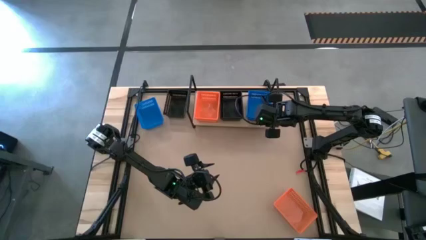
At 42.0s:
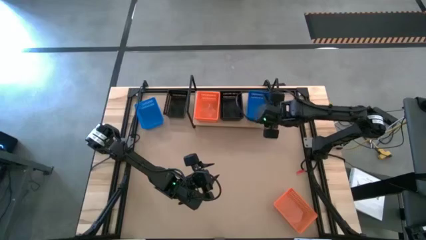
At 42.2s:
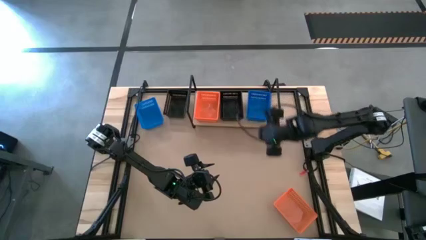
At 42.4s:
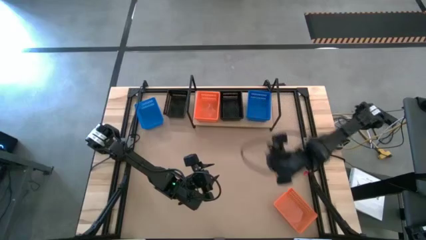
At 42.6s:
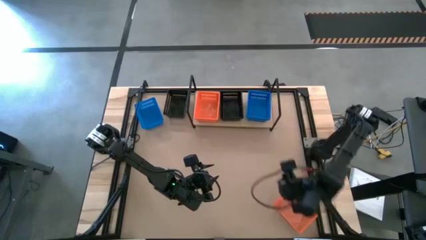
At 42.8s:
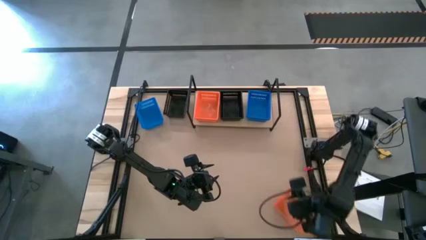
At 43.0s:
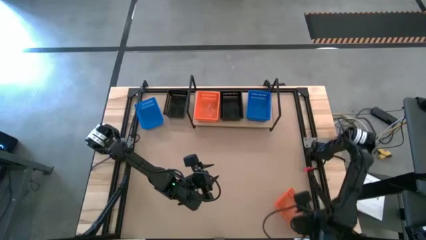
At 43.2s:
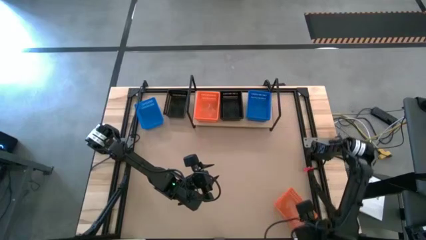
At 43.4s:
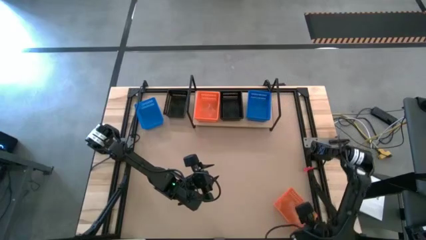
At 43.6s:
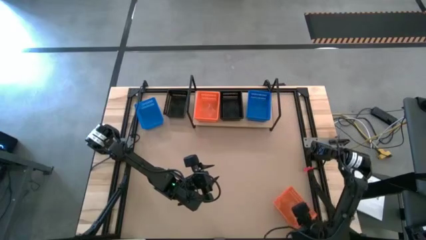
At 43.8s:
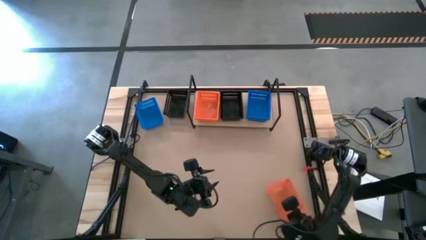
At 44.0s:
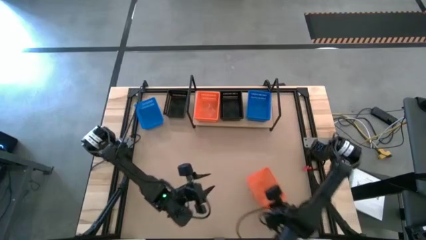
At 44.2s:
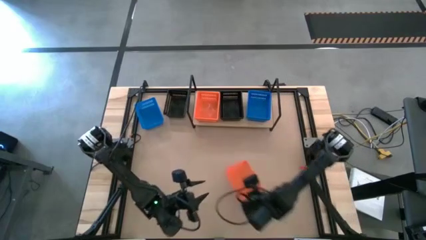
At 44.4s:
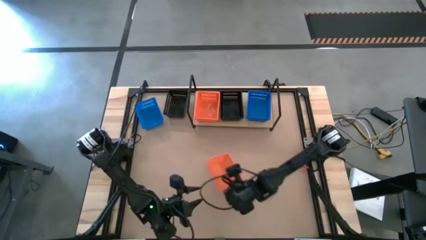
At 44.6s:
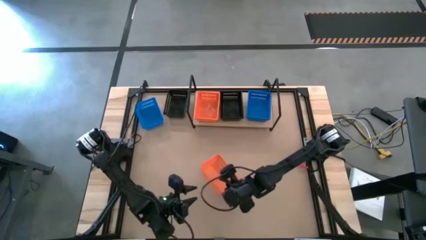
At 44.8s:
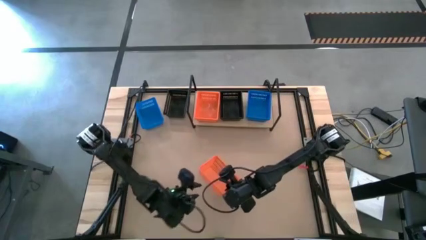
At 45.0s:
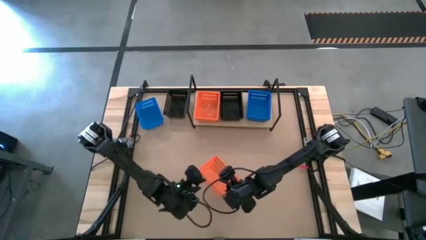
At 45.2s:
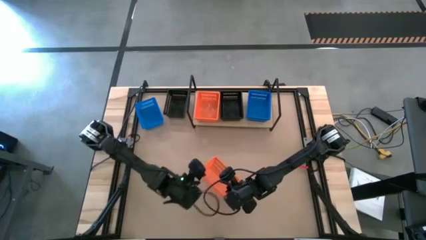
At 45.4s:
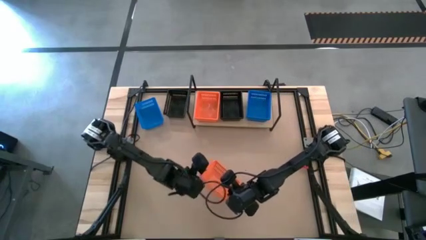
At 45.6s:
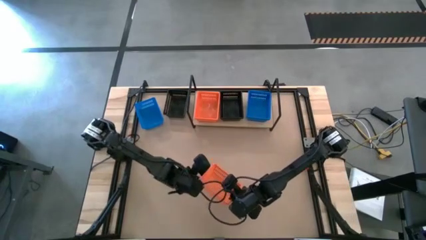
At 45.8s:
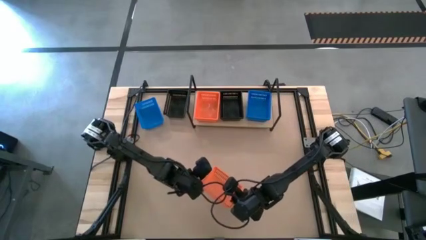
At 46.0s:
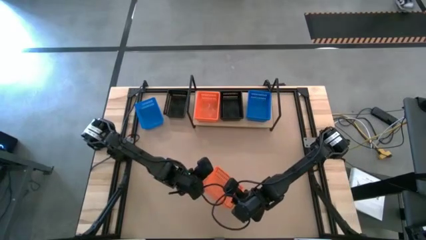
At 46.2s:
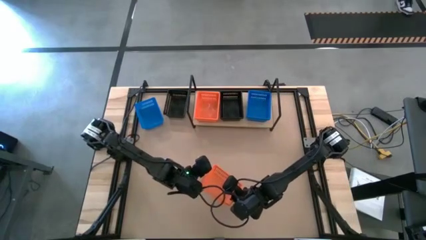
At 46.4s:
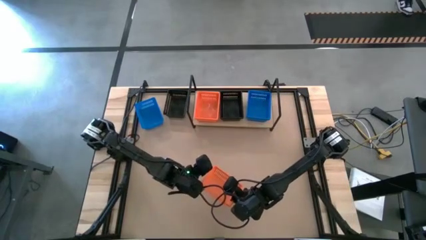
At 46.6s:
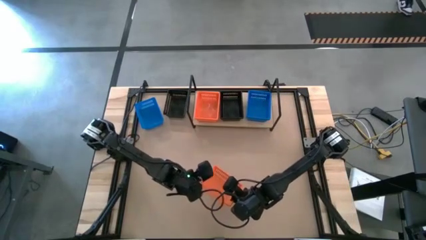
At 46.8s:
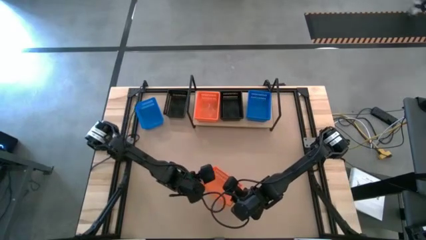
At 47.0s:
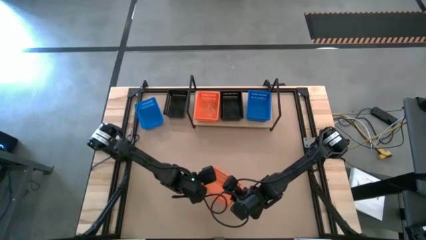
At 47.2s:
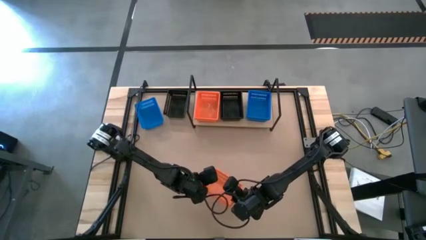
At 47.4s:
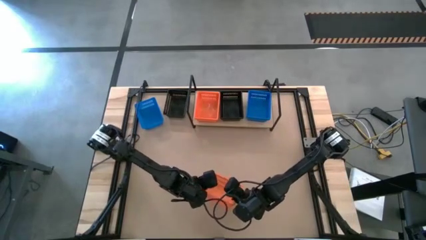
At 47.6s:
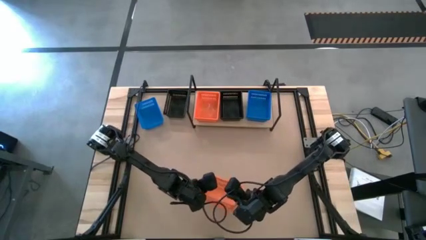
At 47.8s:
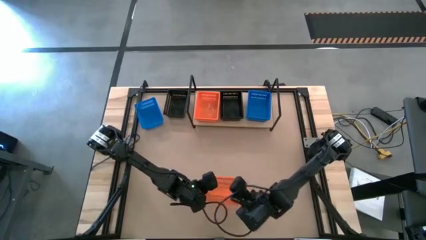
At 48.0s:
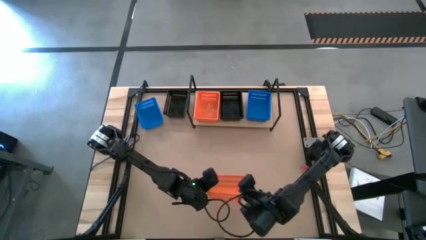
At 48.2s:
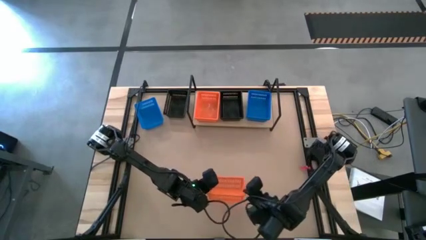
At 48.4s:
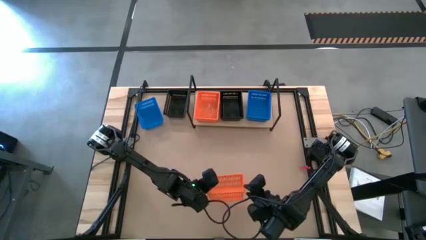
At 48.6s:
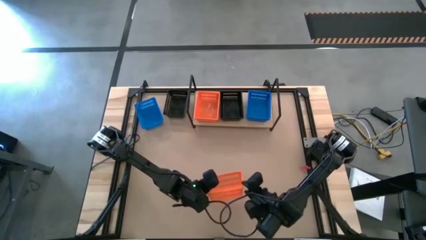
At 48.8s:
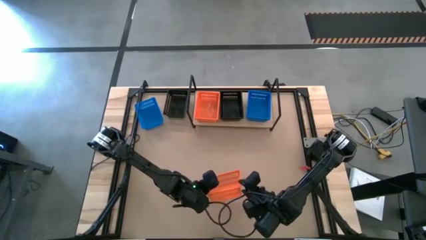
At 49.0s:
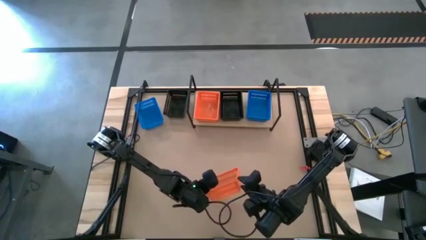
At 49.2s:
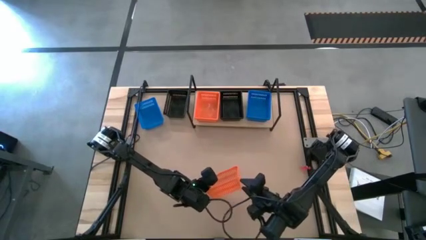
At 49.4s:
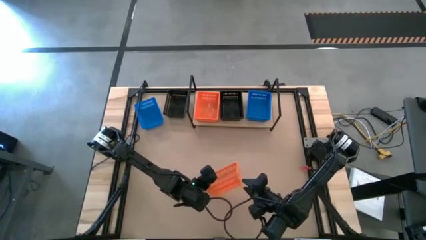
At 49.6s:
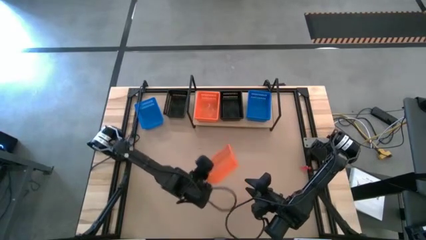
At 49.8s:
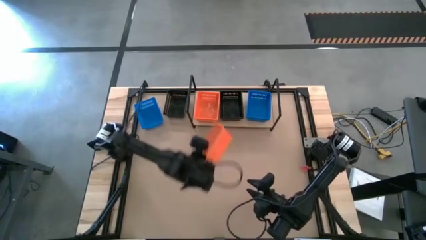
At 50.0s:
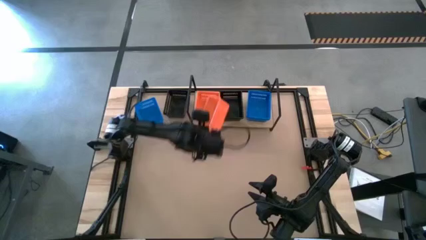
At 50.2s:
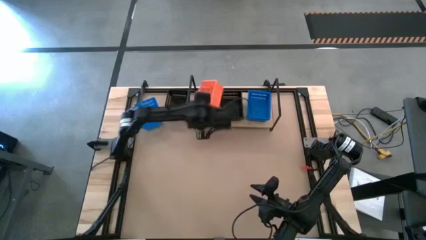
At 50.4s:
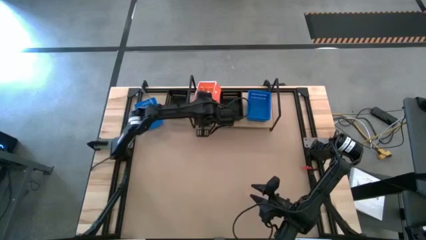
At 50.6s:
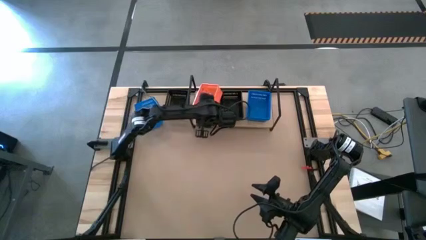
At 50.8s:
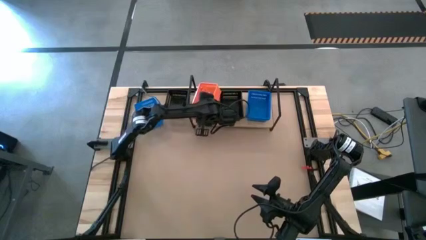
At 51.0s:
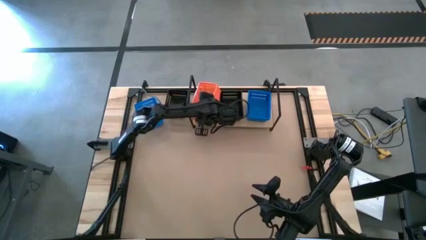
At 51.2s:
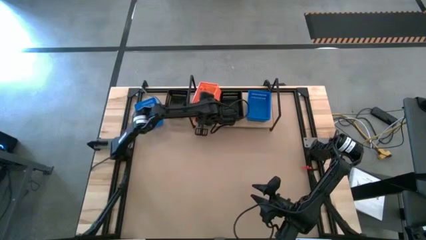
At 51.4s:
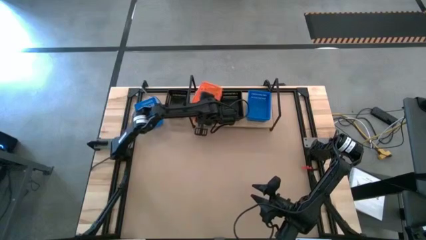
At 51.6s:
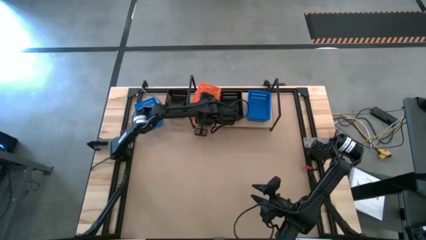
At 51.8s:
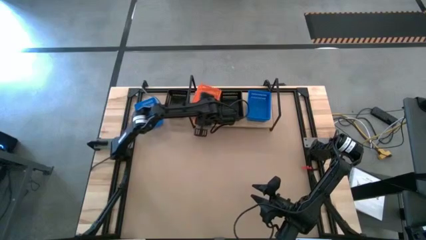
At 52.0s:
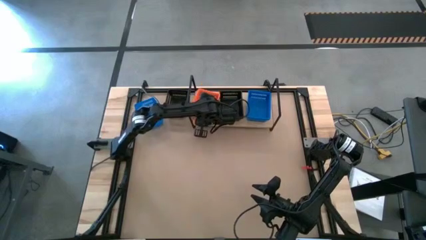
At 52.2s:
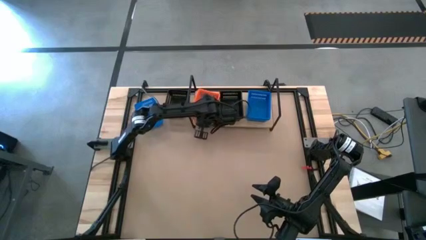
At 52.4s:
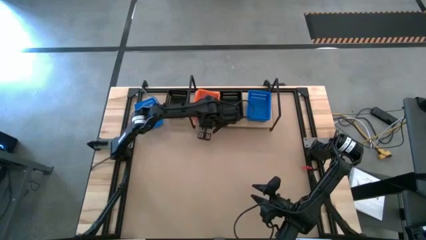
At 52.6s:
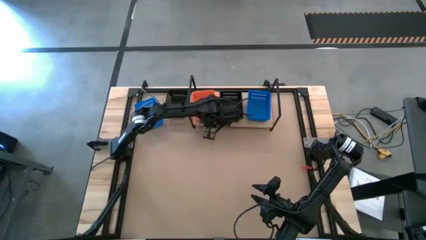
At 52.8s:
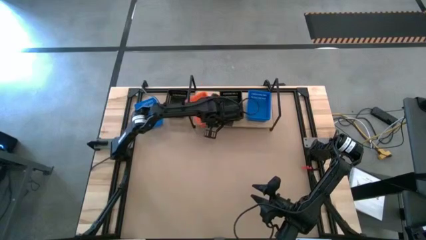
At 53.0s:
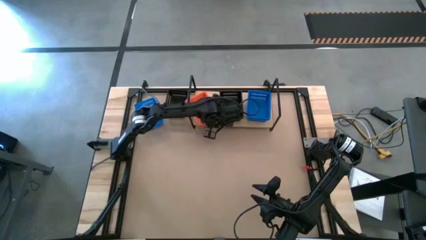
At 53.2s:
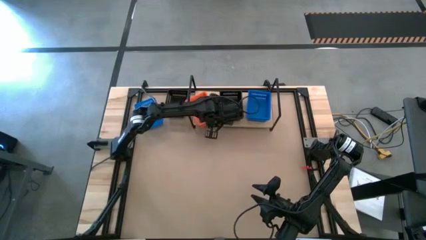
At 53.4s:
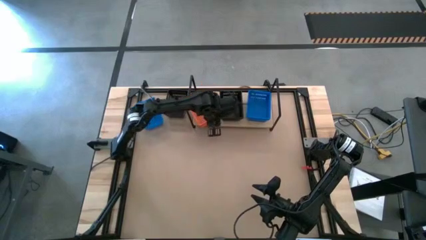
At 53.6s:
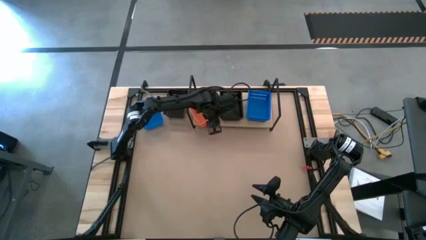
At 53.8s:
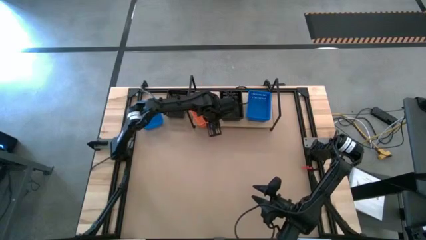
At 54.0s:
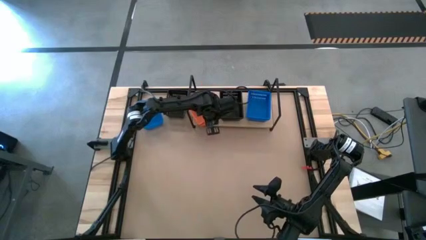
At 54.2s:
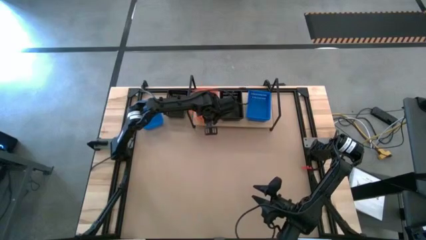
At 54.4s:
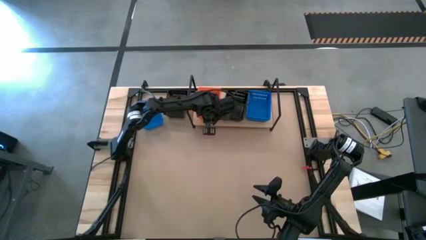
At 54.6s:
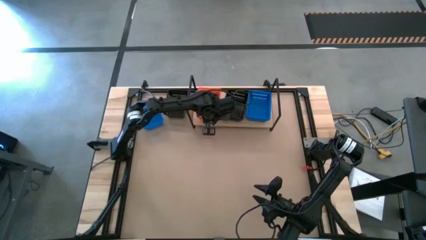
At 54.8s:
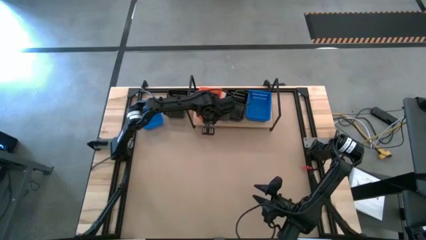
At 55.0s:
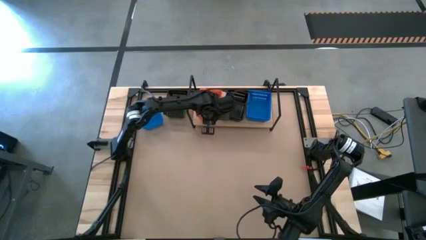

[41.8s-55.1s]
Task: Stack baskets on shelf by color
Stack the orange bin on the stacked orange bins on the shelf

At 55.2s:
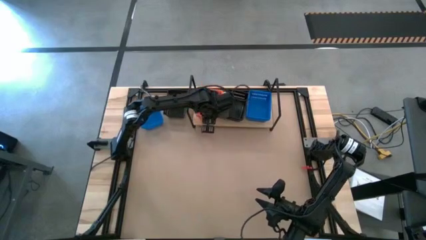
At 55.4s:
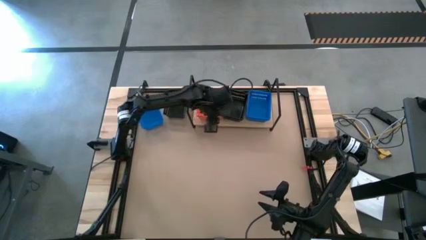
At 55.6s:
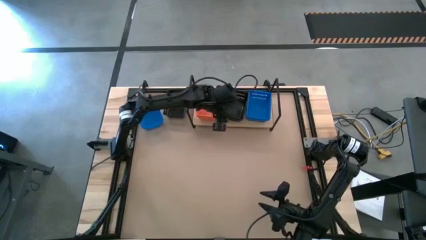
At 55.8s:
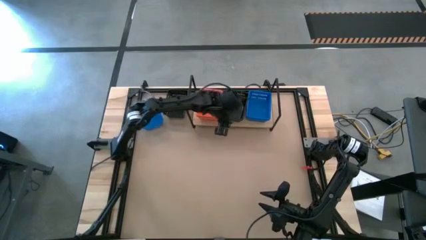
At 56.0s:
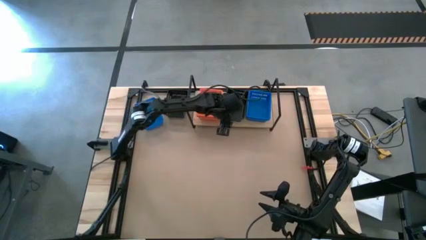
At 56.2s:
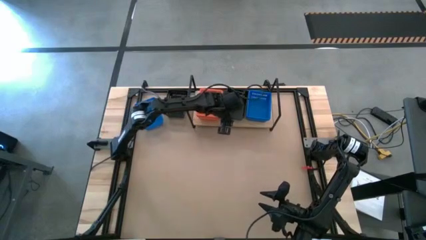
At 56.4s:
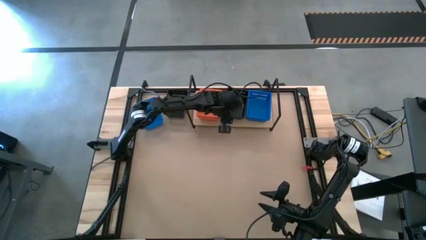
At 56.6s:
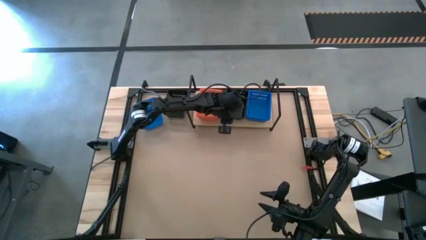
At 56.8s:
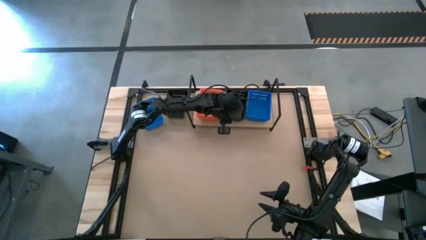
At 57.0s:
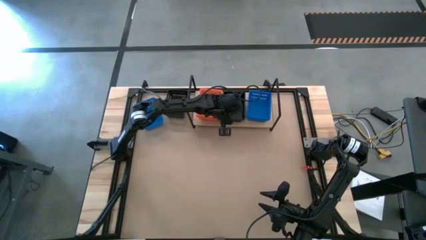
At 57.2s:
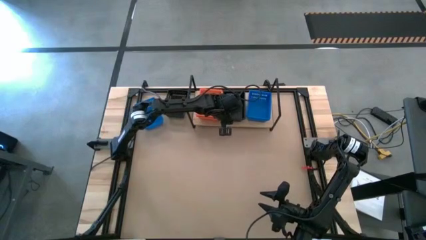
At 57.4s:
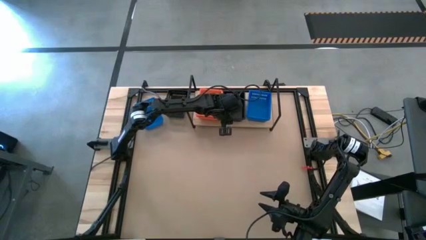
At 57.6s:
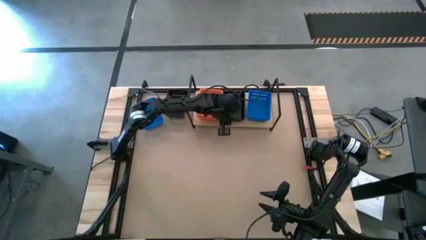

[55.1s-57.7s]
Adjust the stacked black bins on the shelf

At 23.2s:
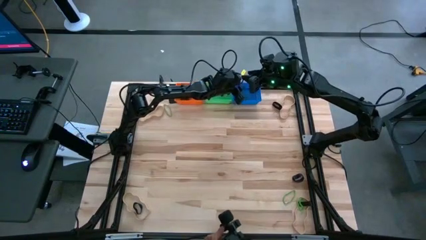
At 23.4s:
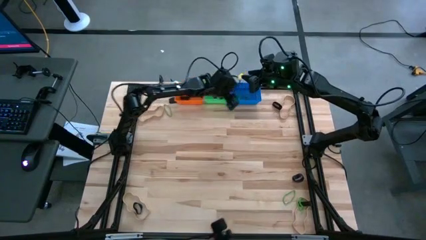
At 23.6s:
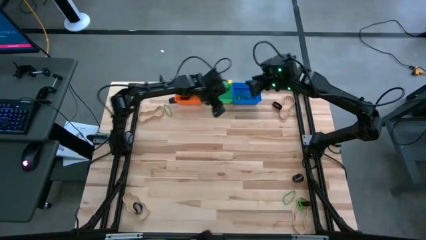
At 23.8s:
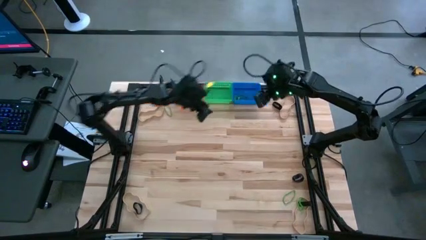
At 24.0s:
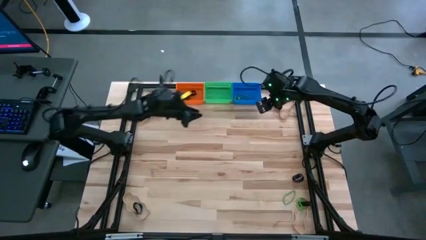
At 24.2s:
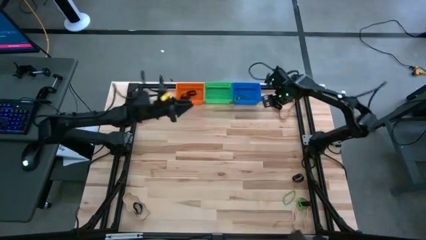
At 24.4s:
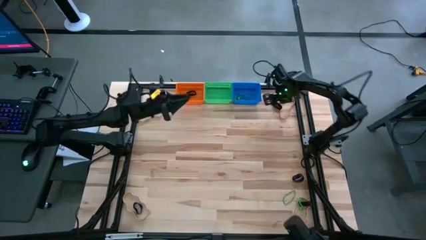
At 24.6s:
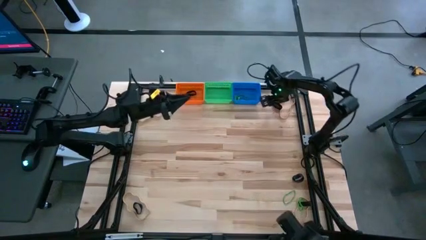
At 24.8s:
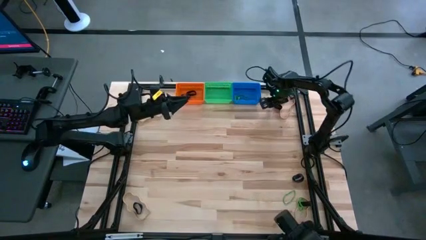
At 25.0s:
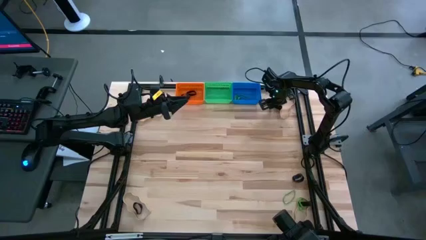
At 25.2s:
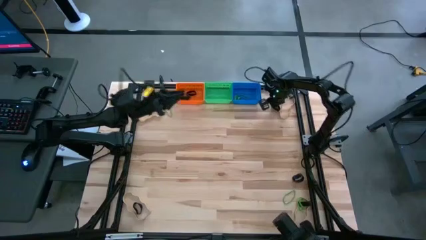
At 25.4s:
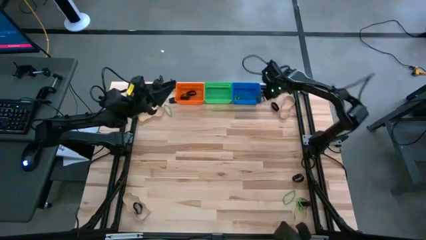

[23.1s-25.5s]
Task: Sort rubber bands into baskets
Put the black rubber band into the orange basket
